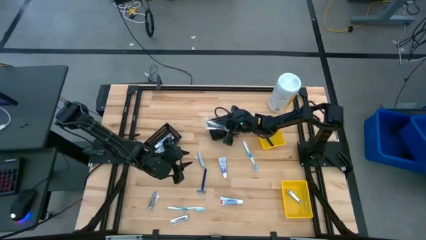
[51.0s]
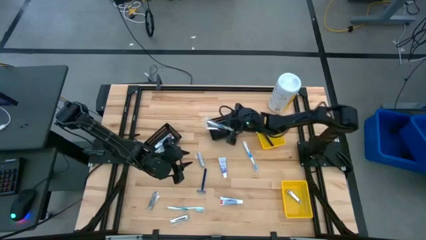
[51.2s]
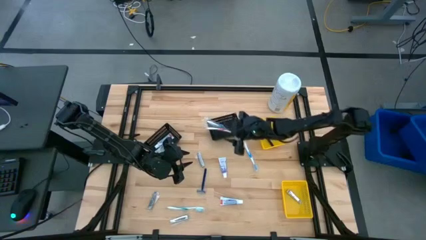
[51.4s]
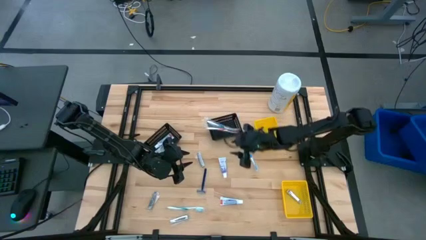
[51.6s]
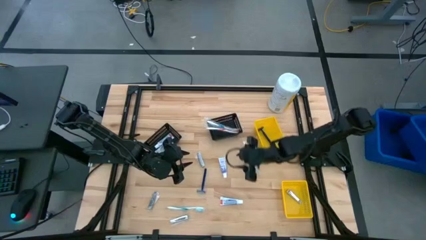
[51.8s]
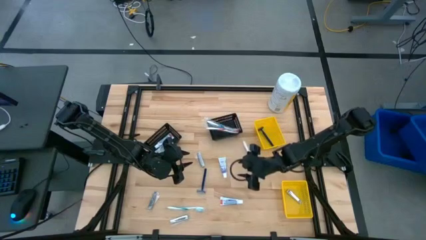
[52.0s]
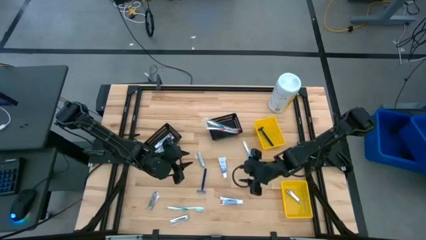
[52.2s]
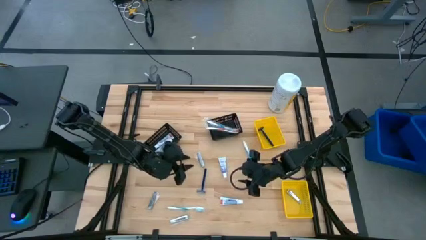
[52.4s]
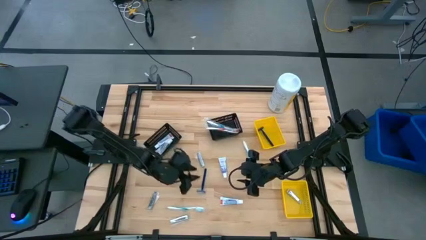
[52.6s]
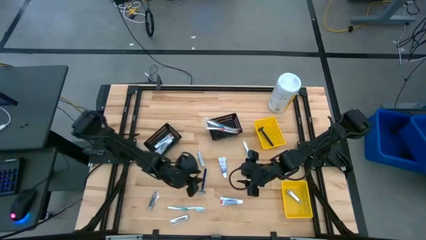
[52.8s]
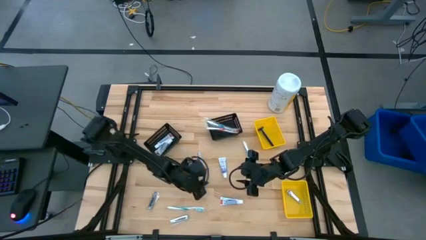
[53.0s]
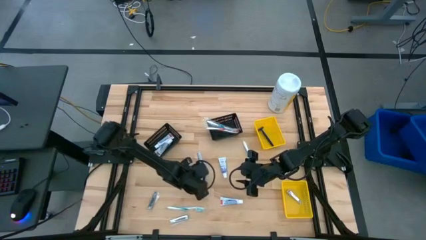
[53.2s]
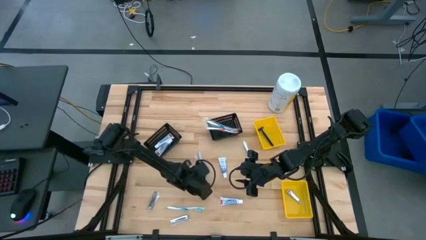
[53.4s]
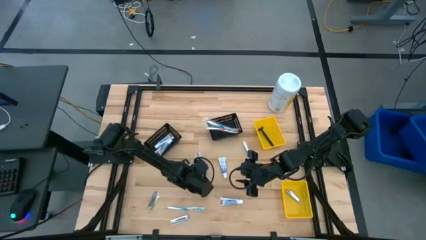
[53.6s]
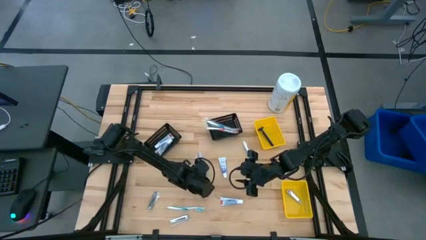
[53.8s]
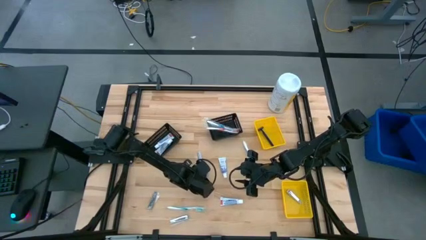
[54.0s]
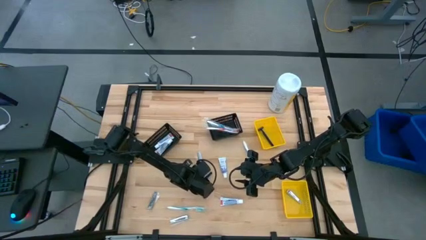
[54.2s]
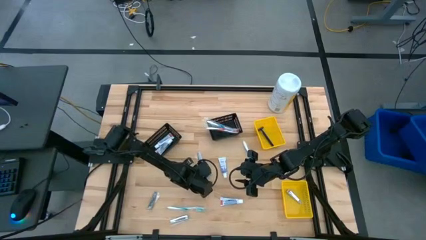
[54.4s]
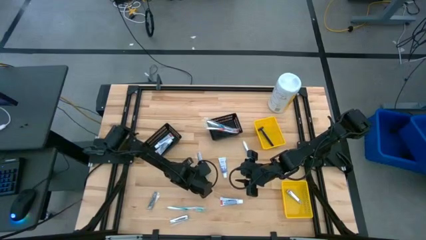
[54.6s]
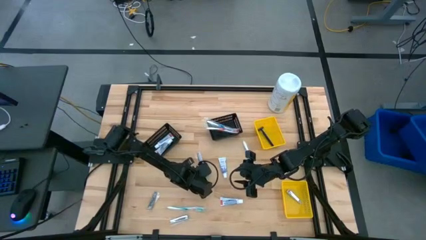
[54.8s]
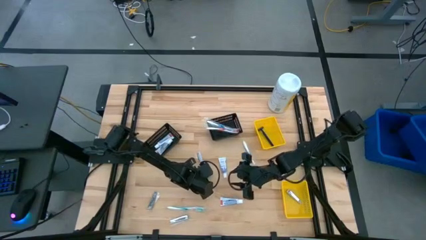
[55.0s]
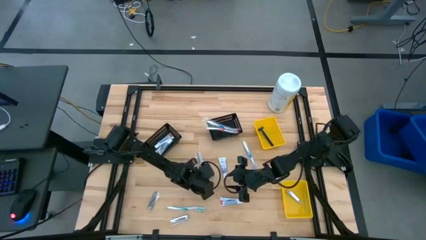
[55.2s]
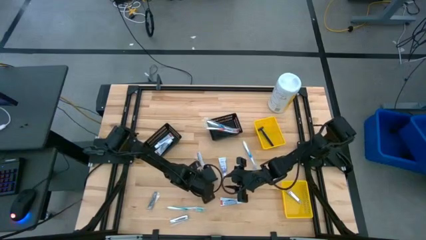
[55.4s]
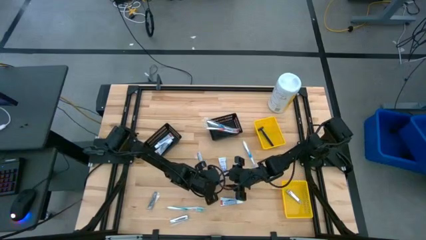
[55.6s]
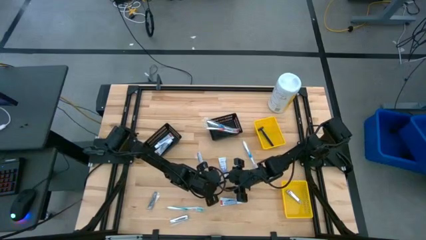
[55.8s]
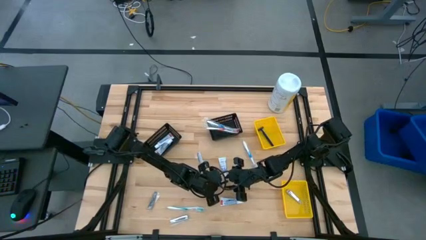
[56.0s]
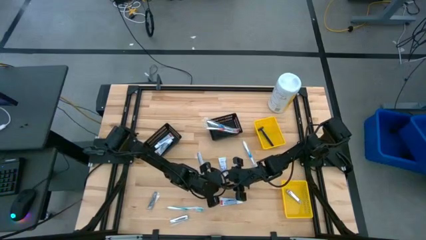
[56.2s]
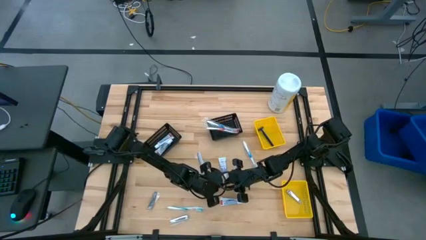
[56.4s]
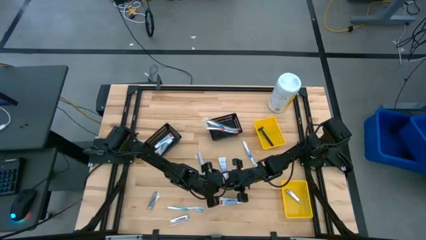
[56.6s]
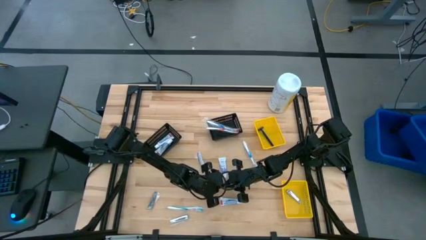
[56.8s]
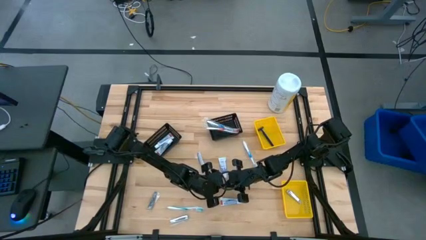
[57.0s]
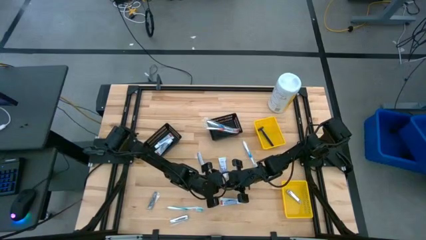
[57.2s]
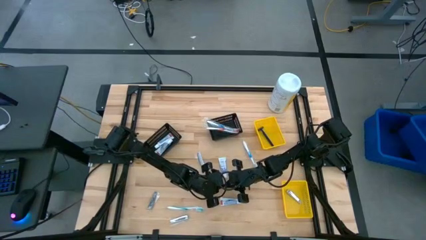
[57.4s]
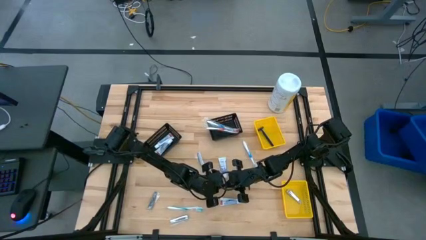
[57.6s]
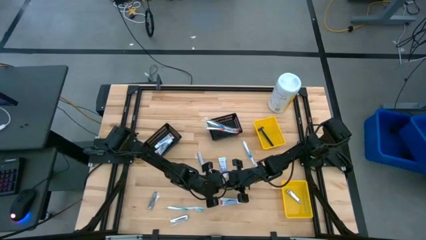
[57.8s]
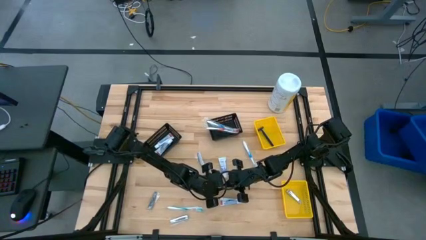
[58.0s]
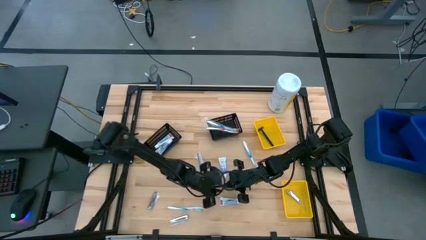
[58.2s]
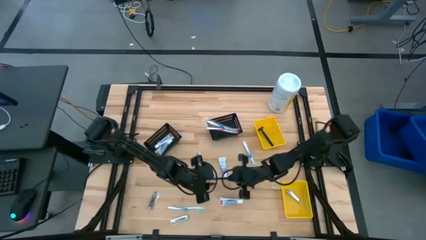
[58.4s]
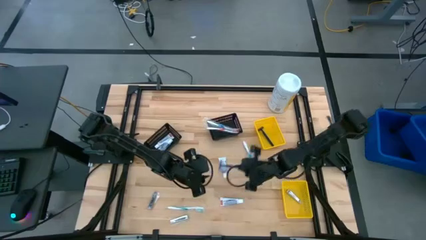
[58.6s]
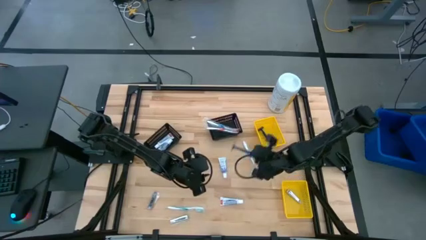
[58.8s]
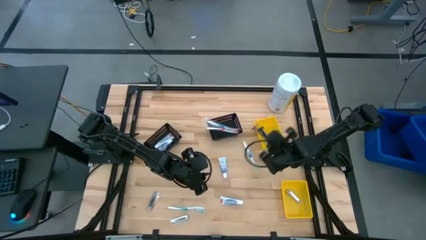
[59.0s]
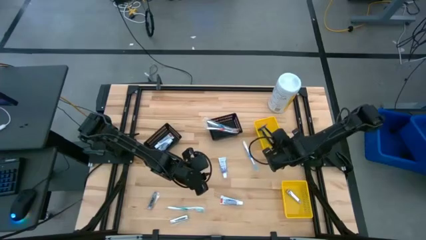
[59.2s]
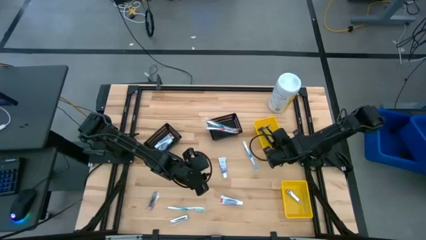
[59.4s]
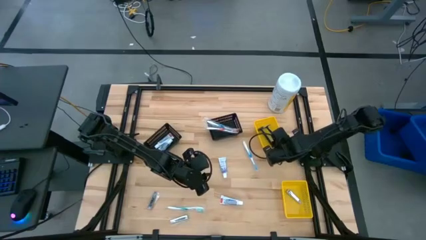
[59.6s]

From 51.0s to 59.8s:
Task: Pick & Place Travel size toiletries
Put the blue razor into the top yellow basket

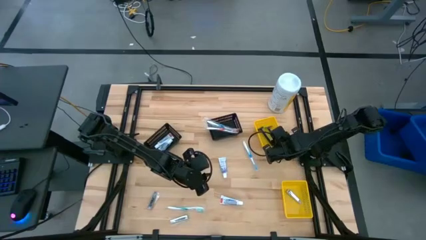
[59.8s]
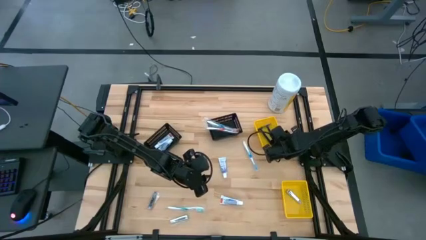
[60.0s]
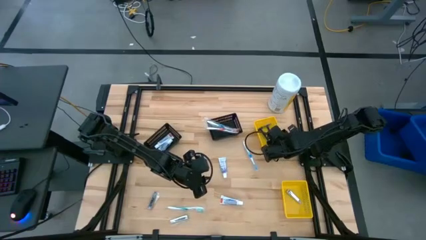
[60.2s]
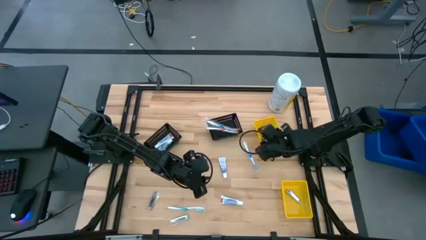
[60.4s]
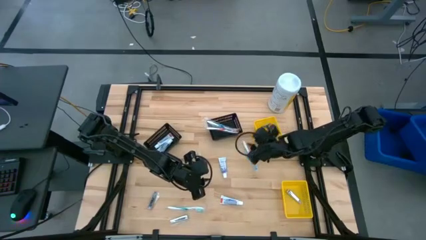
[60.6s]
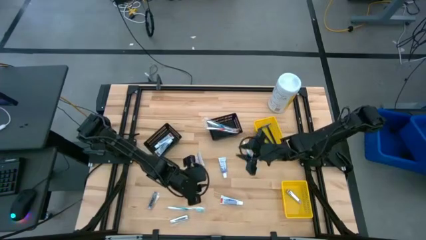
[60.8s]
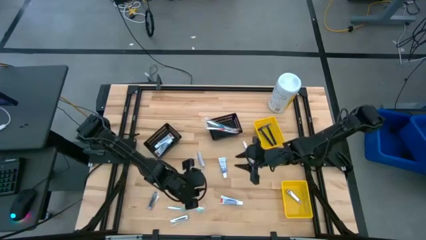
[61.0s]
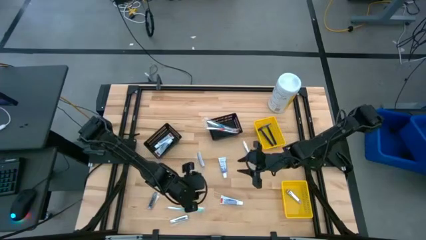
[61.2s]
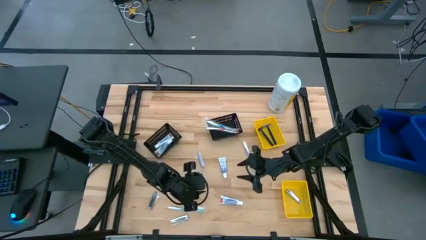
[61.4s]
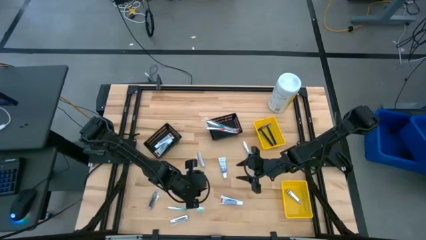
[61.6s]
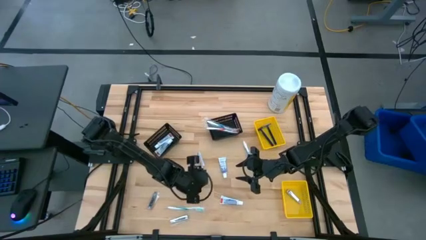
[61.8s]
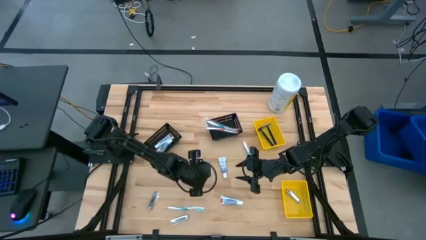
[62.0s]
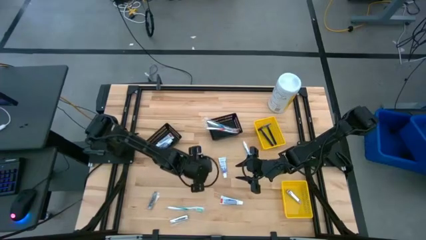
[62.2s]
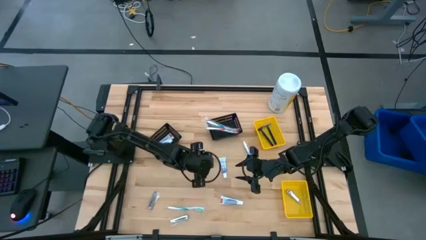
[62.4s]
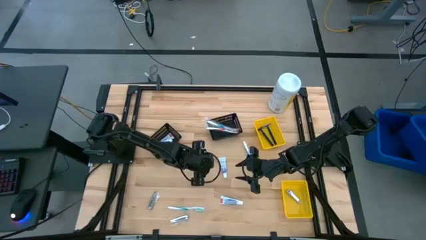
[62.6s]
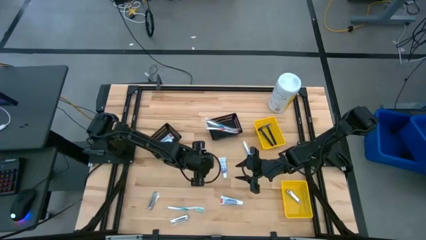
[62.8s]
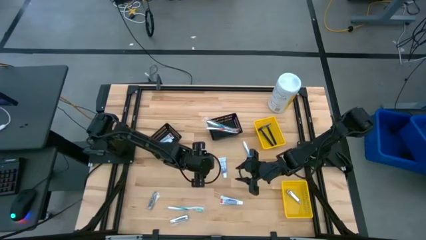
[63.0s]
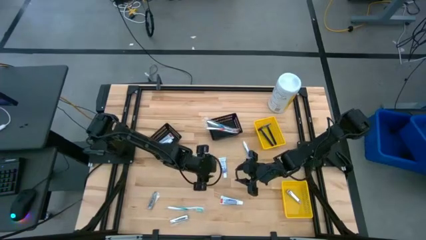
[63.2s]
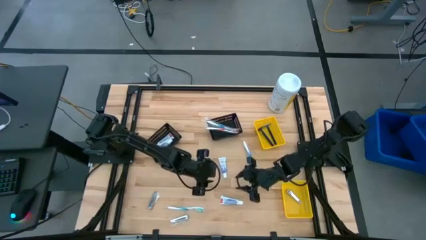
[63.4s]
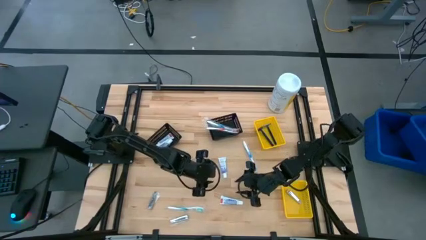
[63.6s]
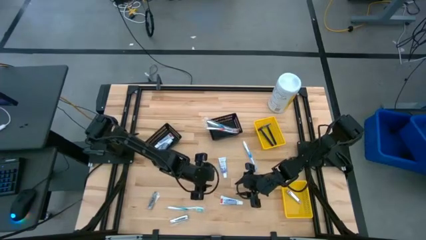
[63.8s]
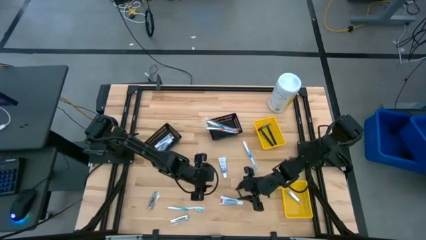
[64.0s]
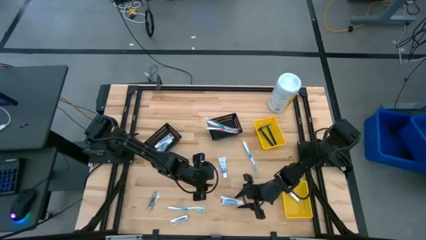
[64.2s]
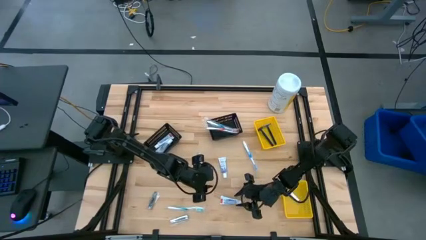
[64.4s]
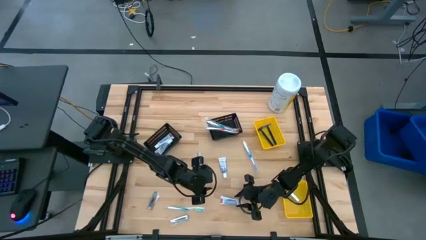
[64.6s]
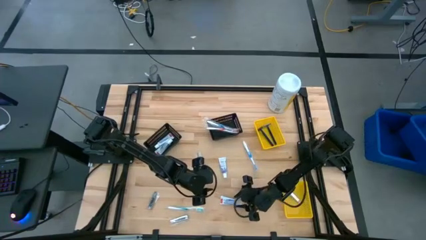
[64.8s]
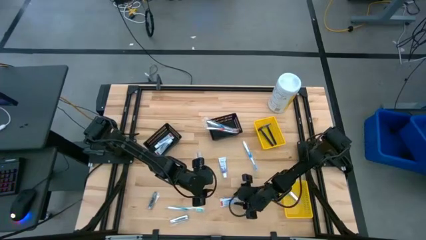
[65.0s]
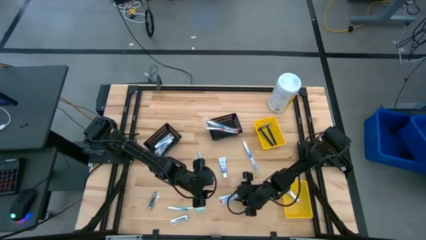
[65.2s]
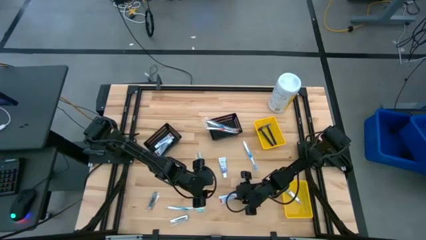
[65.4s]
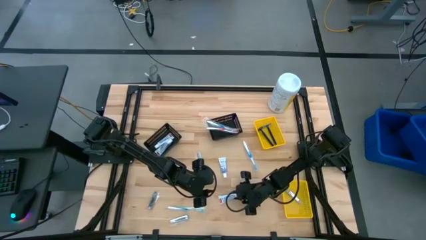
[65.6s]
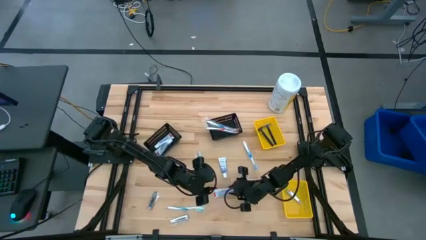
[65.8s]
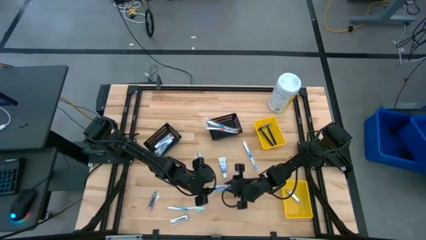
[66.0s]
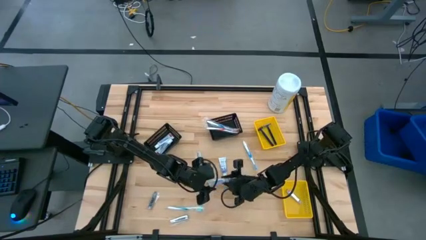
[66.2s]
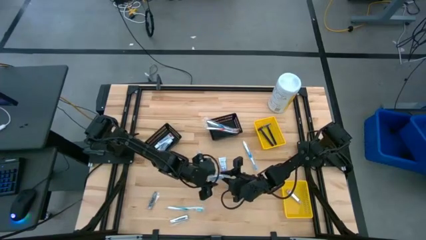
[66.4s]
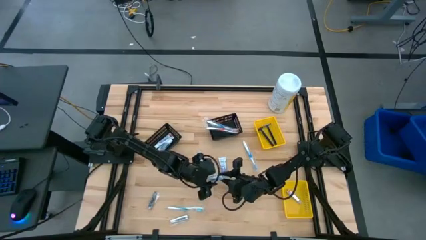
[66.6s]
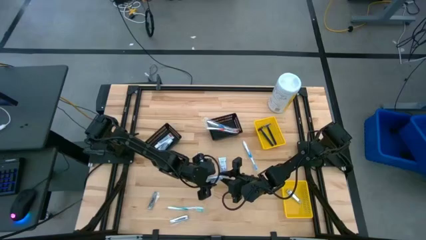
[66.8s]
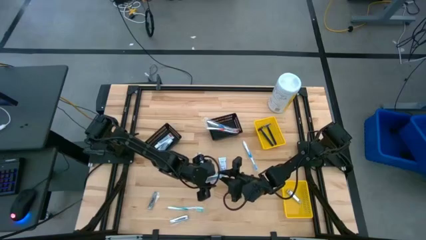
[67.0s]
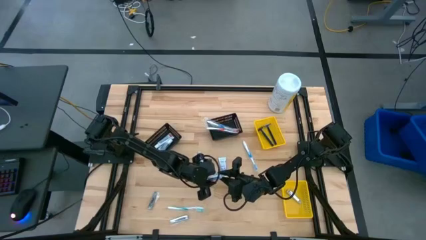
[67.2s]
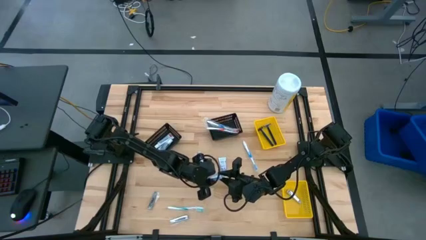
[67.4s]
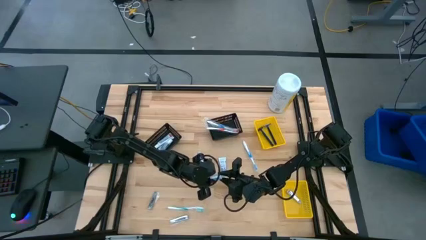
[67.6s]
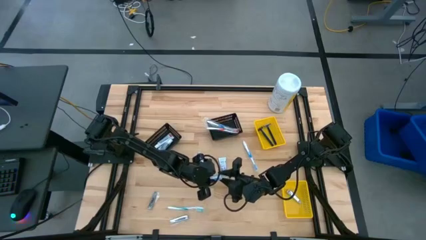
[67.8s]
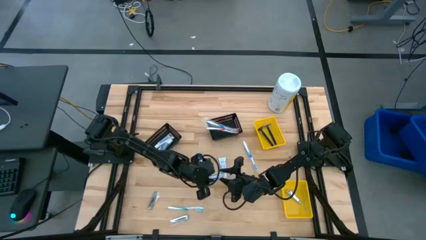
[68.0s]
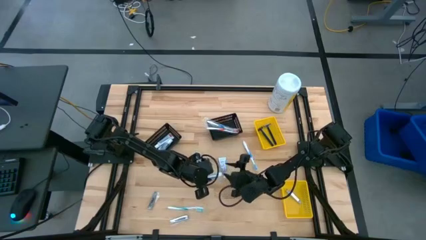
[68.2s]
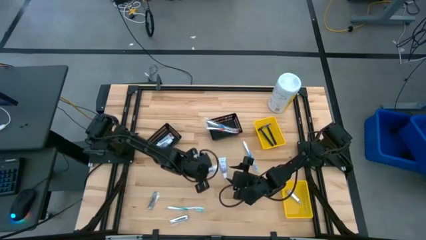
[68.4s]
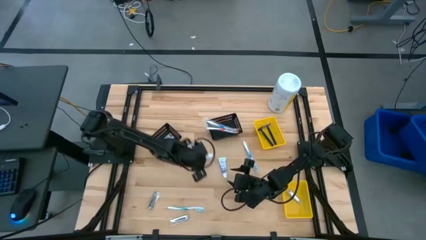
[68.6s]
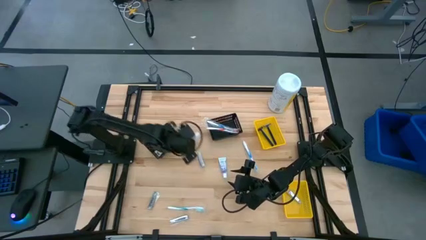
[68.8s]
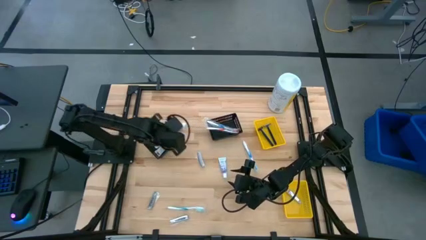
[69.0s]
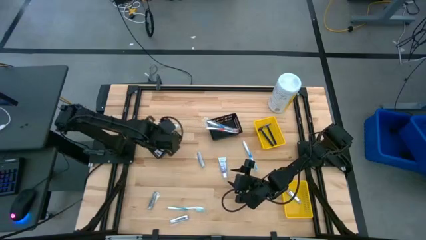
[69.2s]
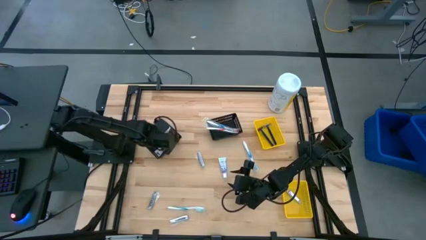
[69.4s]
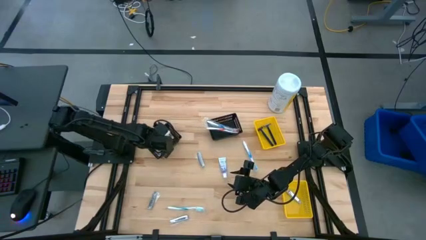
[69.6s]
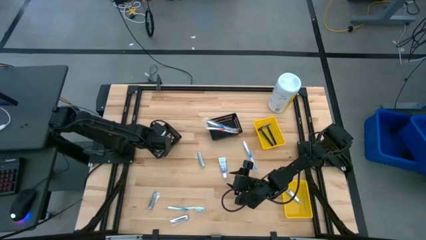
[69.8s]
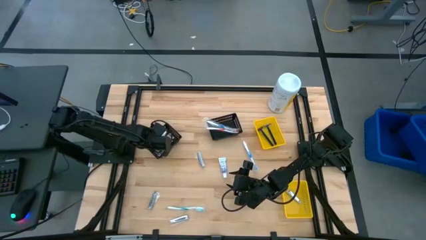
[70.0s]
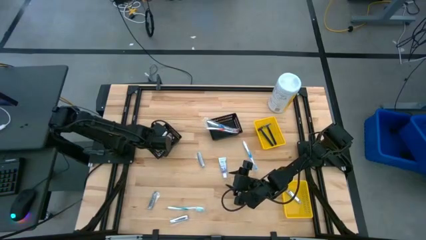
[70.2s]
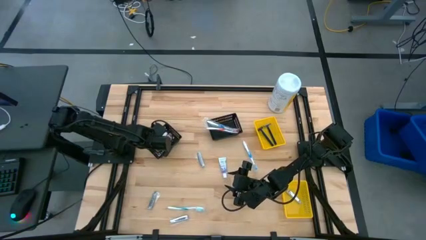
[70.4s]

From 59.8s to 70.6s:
Put the white toothpaste into the left black basket
